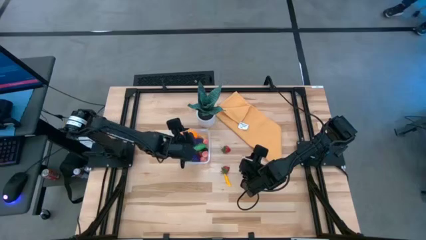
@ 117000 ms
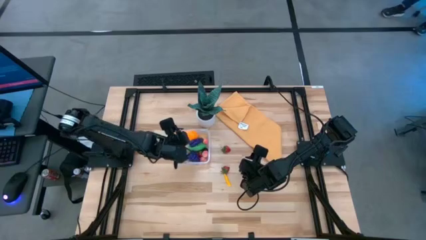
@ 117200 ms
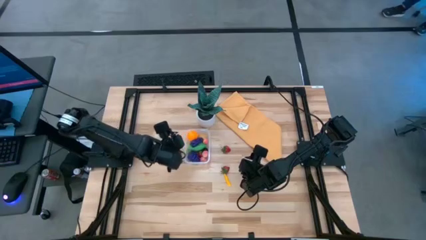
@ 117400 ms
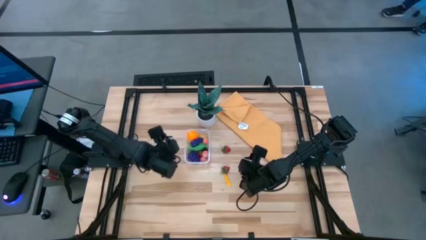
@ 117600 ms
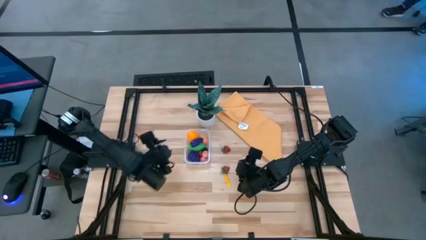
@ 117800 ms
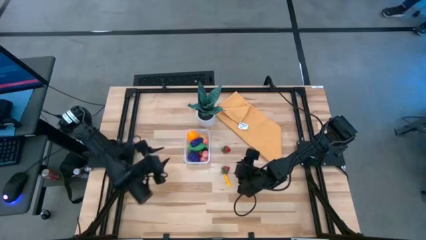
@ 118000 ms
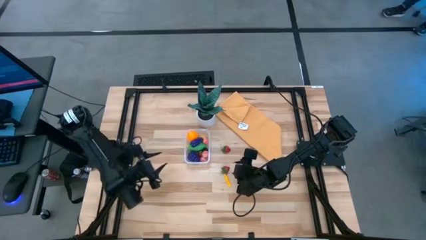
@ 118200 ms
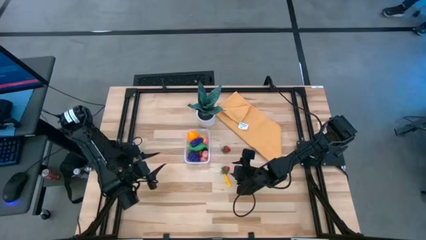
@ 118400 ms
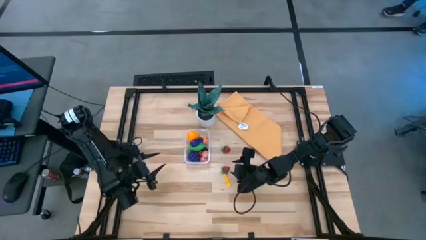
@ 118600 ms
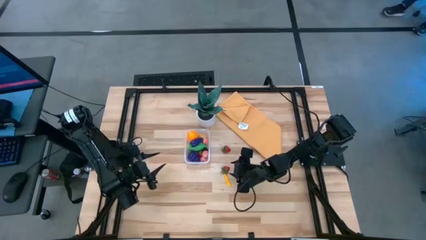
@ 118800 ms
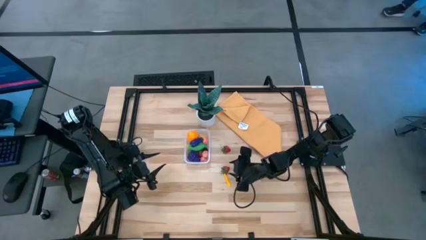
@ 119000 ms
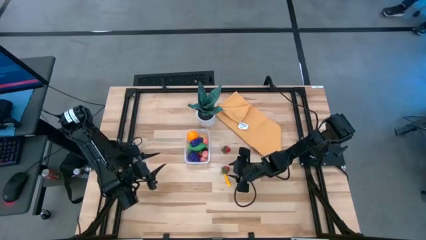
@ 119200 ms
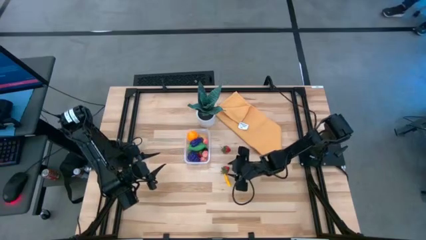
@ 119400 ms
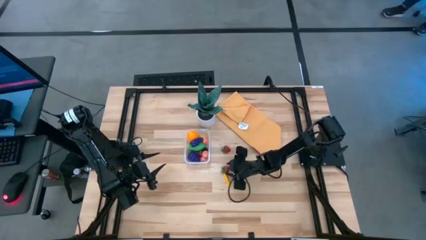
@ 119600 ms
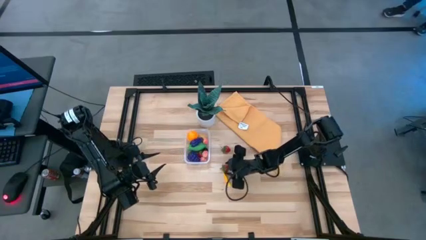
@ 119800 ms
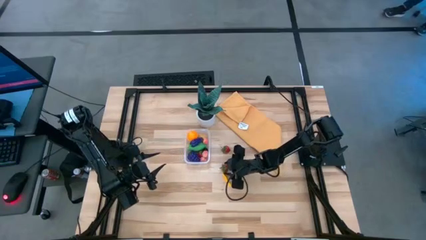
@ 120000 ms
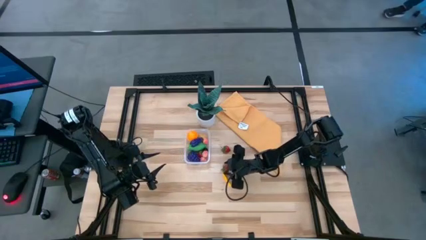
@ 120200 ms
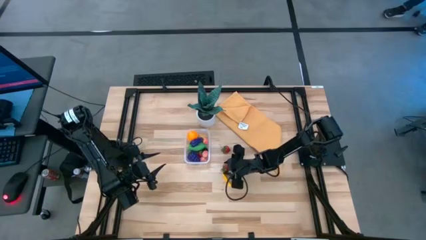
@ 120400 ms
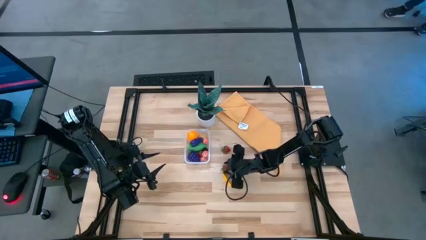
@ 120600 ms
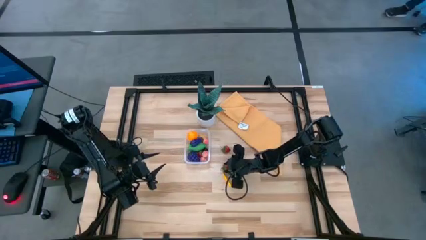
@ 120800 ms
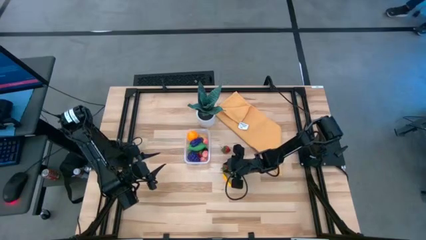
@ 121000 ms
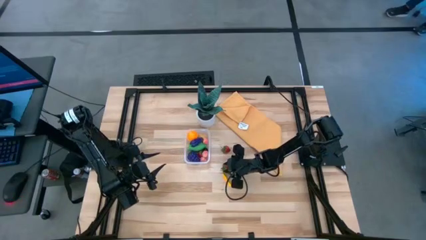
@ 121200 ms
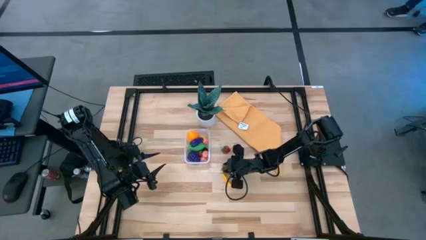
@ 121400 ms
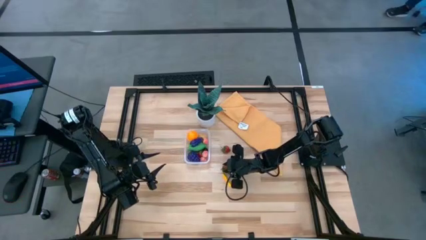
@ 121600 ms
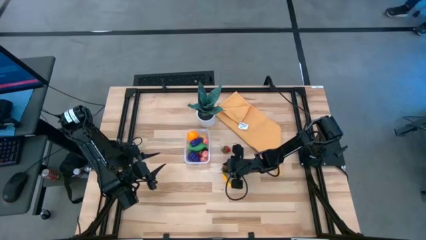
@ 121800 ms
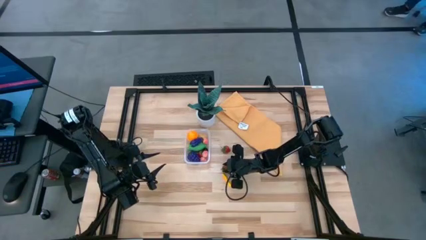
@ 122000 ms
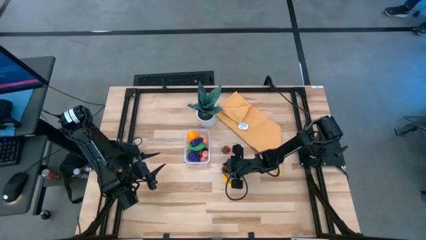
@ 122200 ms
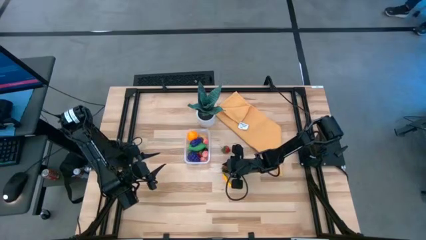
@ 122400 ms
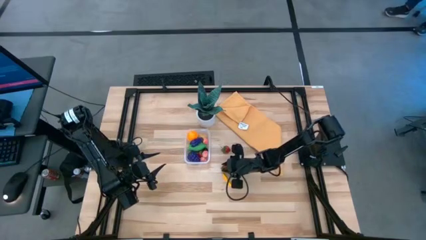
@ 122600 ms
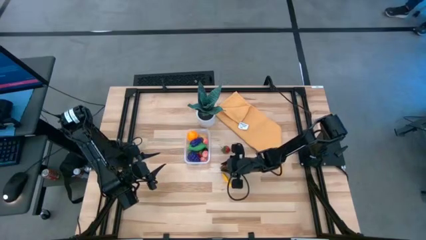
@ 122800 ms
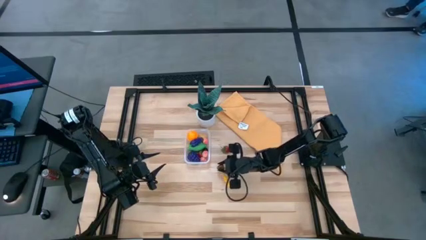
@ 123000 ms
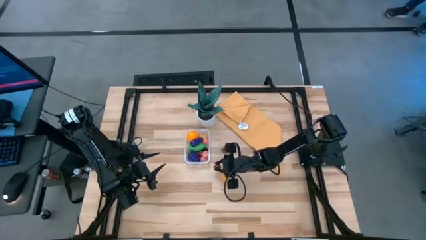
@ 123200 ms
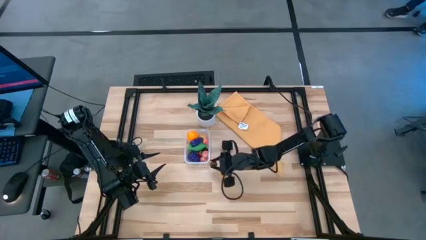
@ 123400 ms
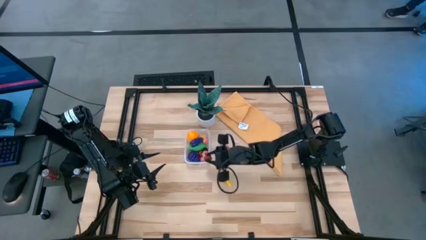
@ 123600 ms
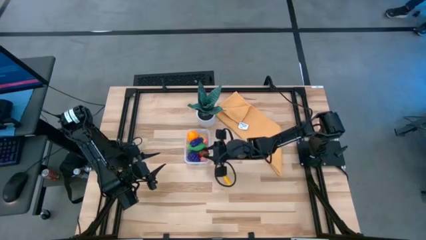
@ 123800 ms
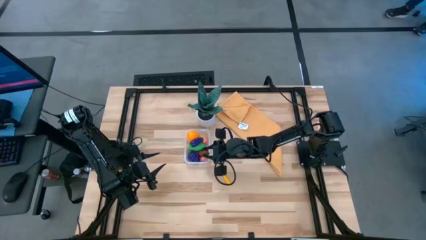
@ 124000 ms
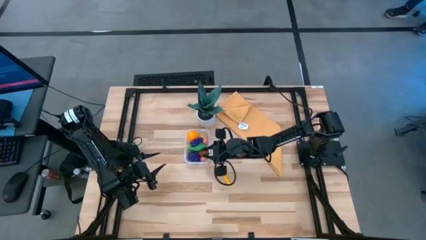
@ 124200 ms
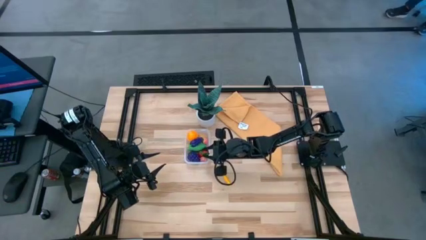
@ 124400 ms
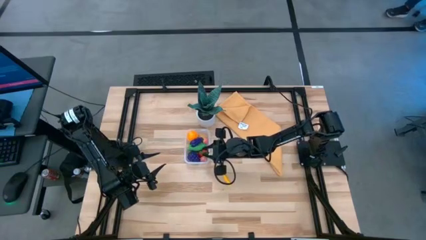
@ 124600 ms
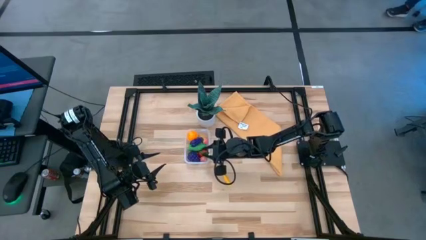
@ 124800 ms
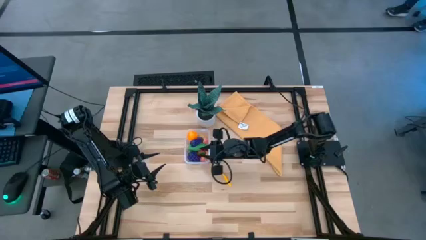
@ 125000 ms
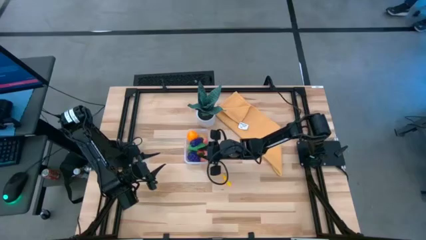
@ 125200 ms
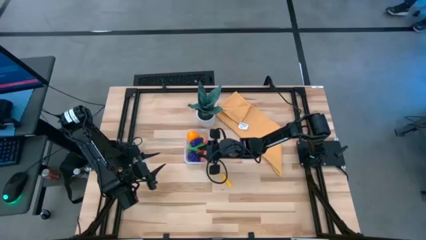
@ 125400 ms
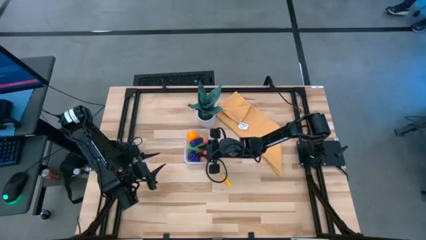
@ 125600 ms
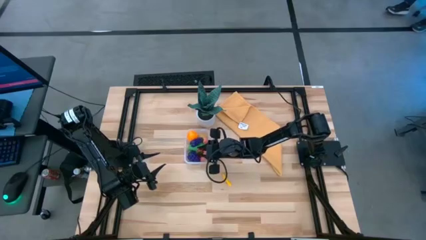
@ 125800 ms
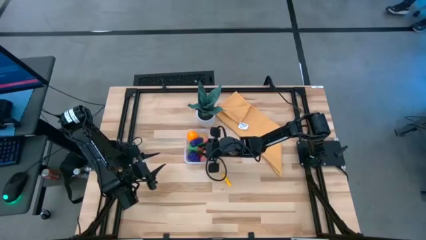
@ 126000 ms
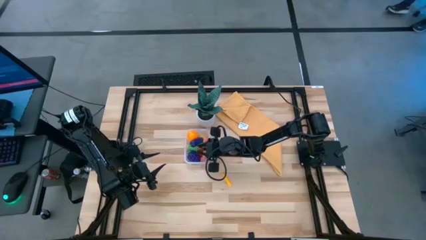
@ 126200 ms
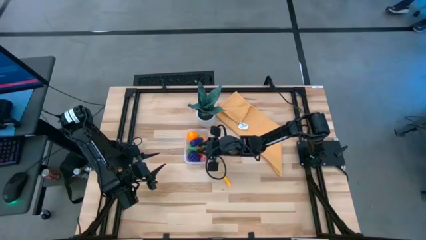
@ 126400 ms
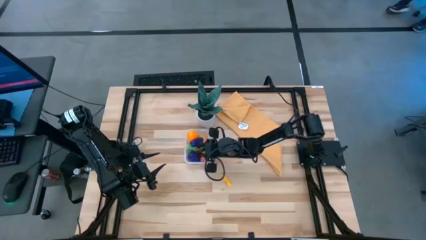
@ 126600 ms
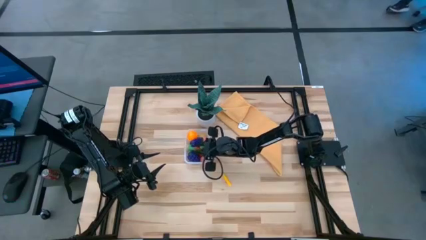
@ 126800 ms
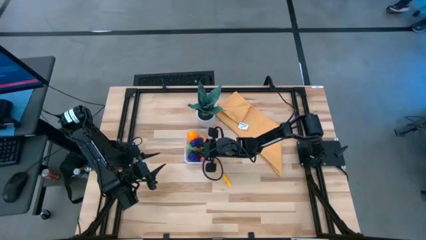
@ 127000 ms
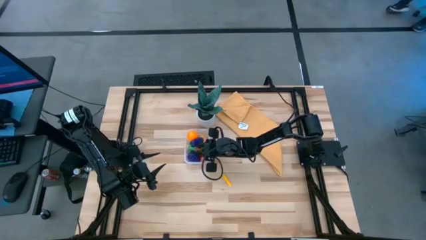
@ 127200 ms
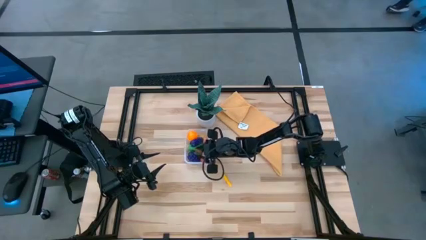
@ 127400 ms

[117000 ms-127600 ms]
Task: Pick and placing Produce into tupperware
Put the bottom strawberry into the transparent bin

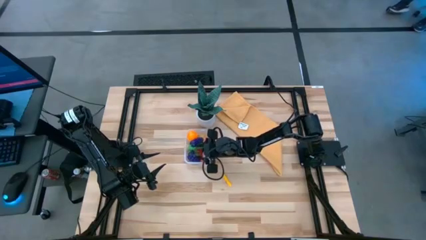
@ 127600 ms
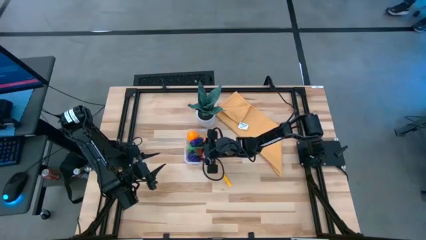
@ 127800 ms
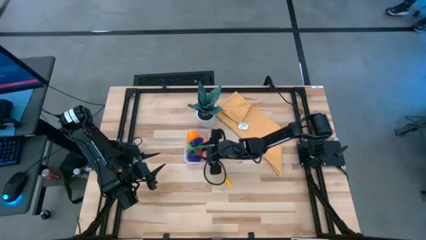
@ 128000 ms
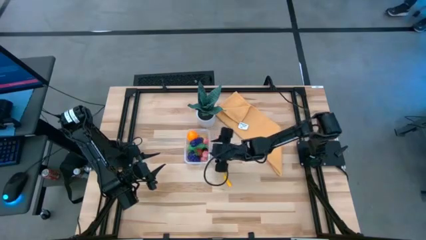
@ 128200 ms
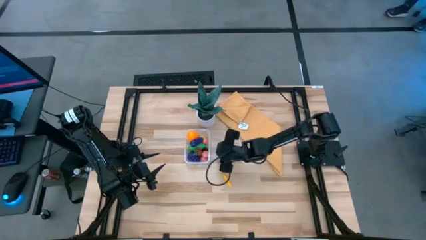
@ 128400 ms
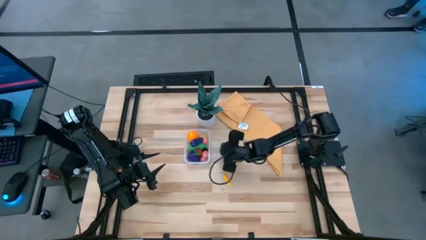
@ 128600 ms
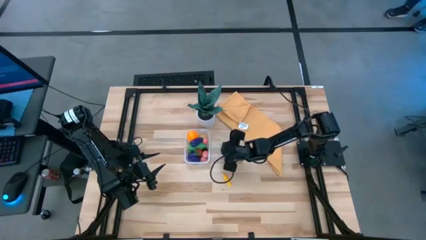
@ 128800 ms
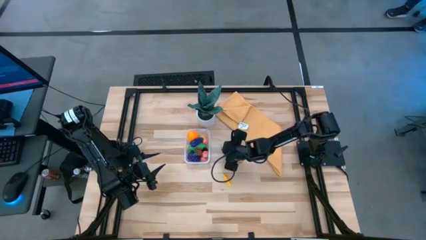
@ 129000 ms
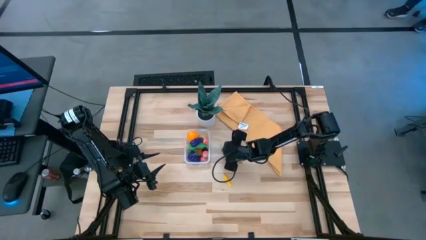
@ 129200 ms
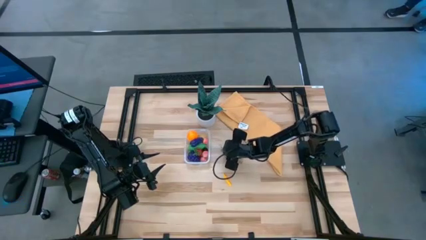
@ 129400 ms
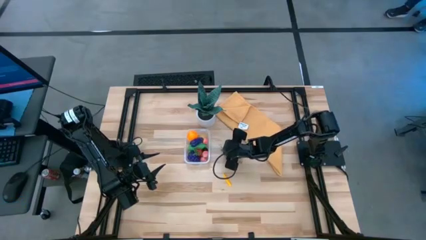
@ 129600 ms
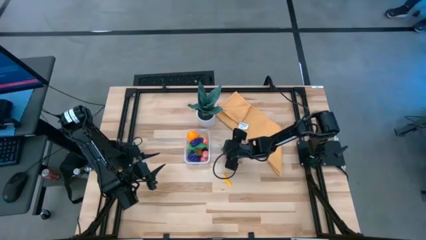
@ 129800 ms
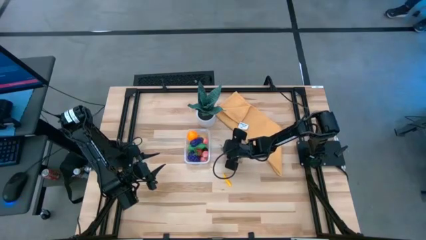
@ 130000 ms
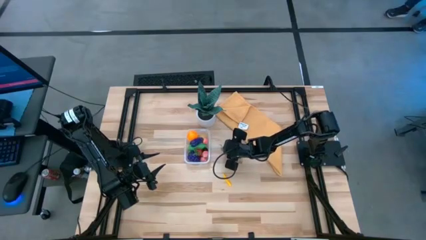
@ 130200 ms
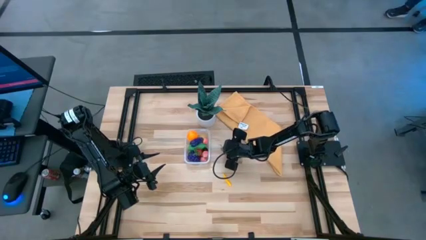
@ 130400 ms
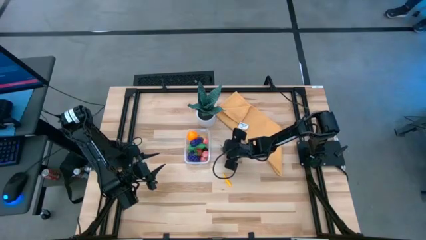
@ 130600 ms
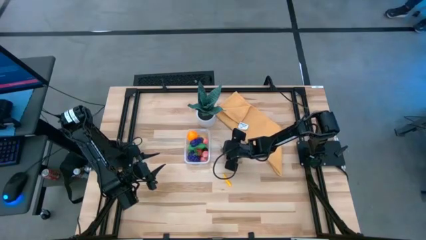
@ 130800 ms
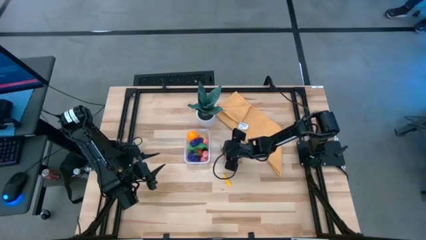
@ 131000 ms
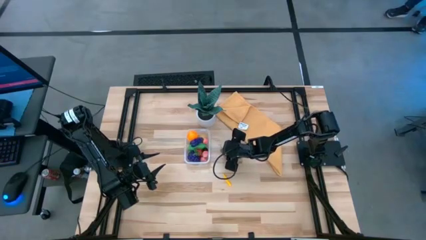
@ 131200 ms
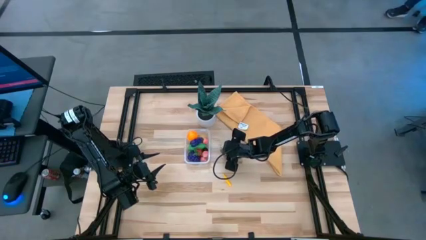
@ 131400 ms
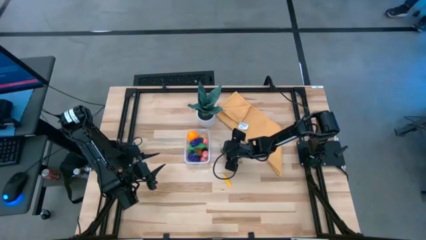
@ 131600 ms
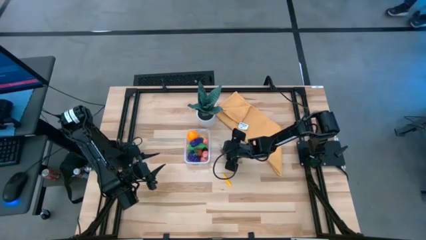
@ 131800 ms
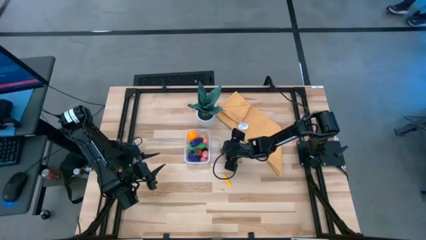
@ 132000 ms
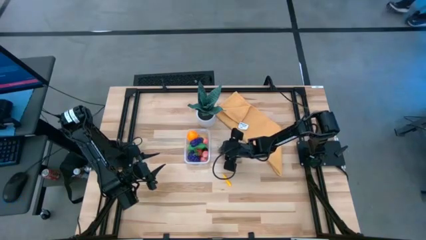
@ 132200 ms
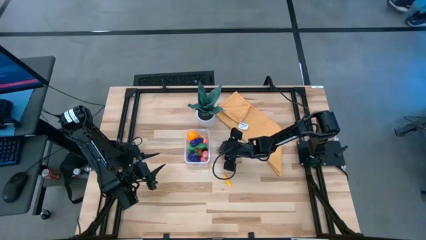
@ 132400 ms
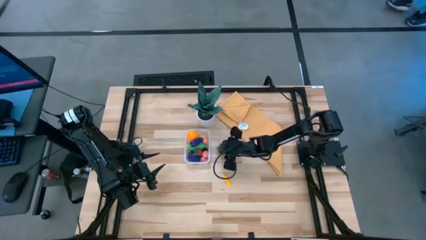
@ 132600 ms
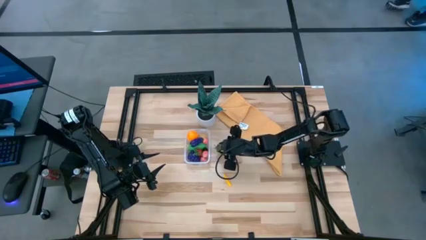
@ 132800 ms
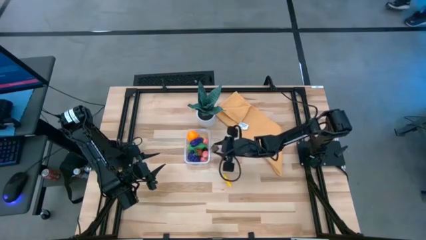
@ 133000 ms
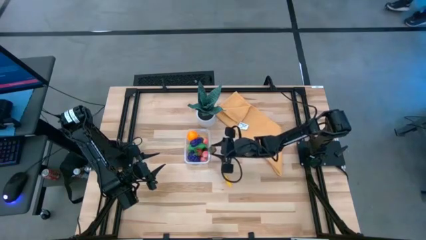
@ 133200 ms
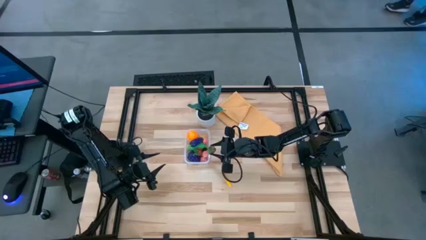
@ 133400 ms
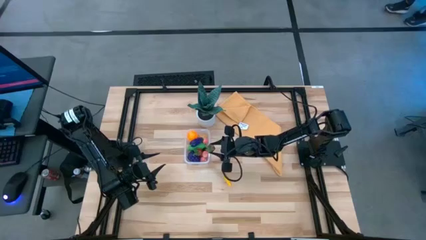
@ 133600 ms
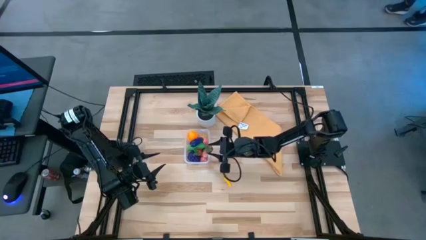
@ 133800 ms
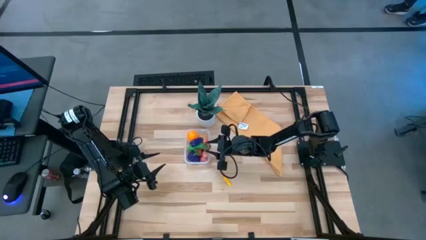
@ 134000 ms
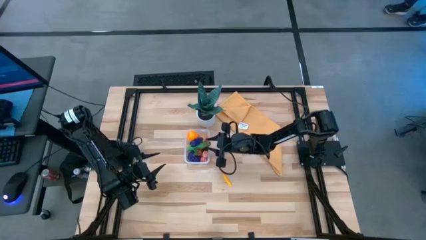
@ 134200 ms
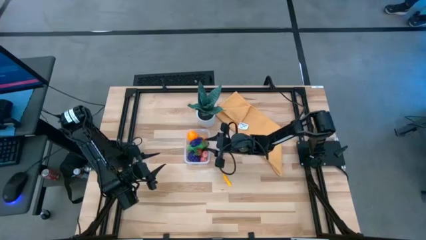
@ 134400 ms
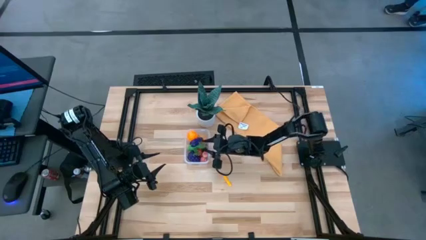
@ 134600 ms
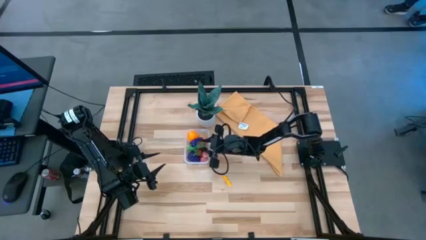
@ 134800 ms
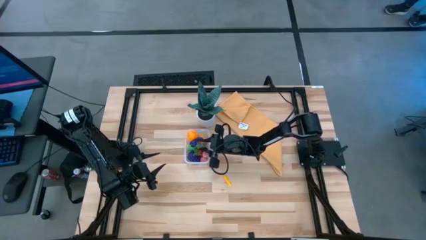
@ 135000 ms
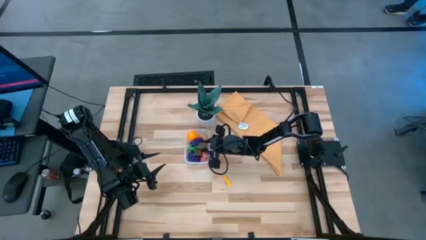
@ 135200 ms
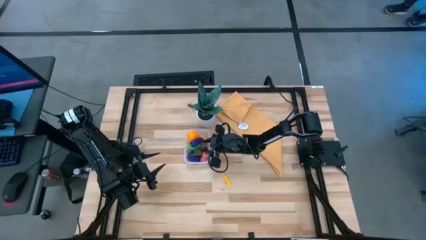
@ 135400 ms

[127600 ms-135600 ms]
Put the strawberry into the transparent bin
